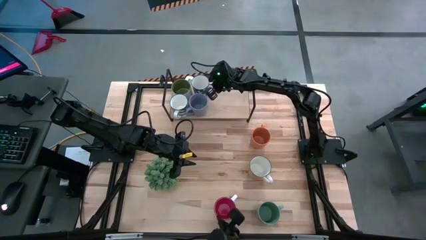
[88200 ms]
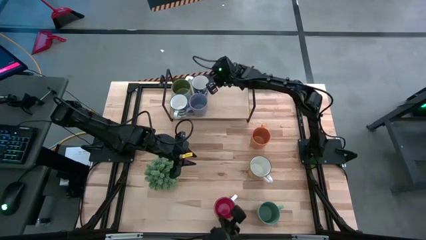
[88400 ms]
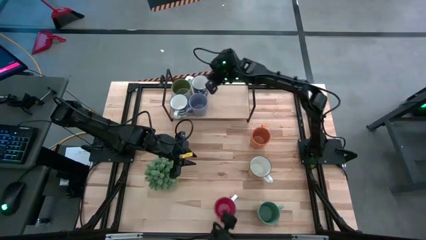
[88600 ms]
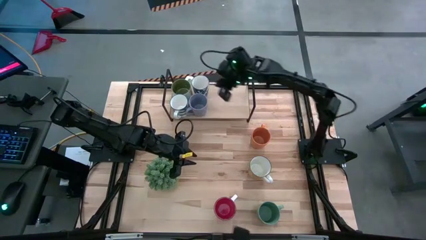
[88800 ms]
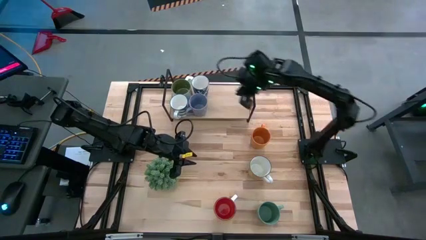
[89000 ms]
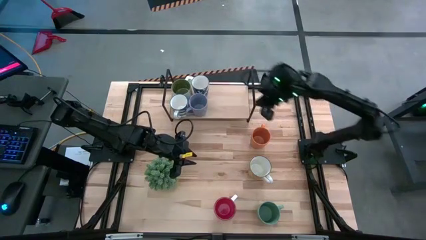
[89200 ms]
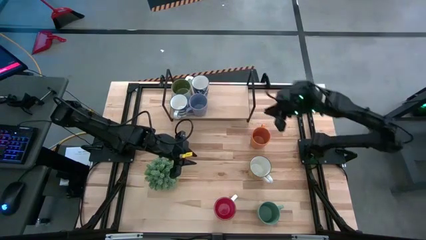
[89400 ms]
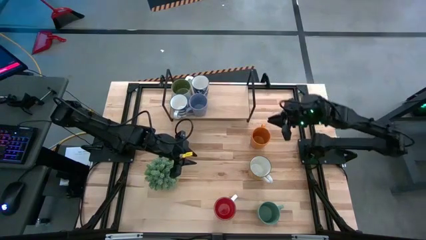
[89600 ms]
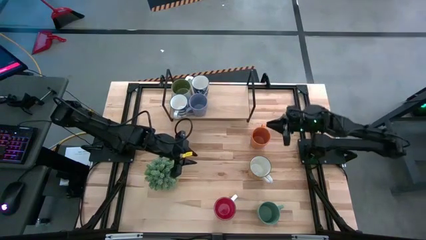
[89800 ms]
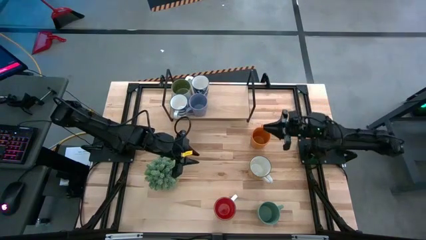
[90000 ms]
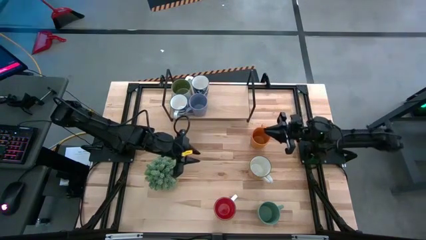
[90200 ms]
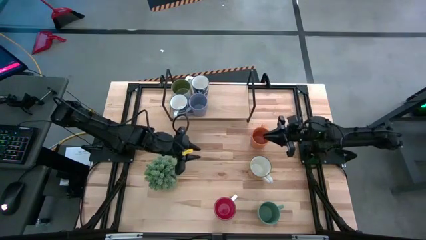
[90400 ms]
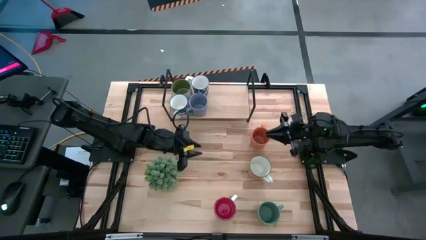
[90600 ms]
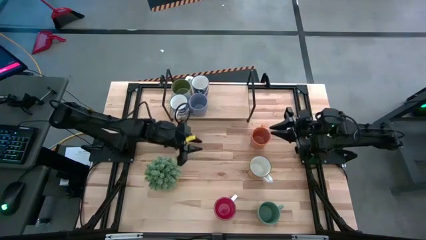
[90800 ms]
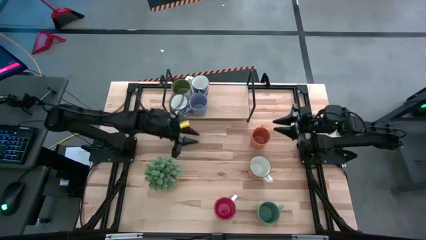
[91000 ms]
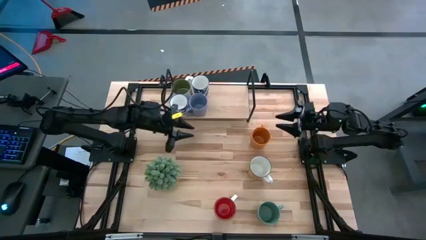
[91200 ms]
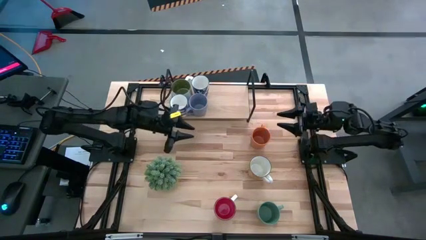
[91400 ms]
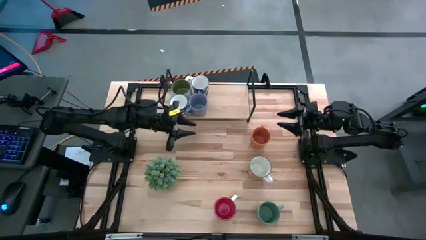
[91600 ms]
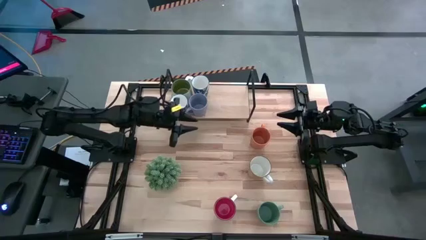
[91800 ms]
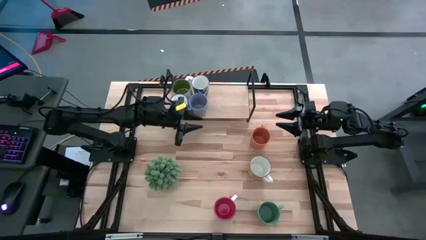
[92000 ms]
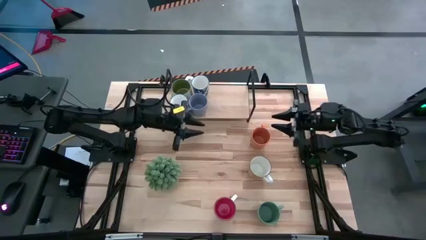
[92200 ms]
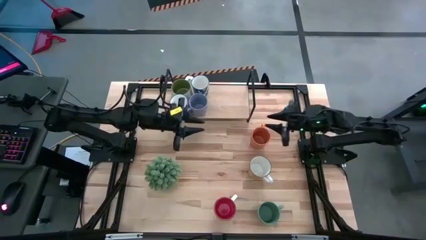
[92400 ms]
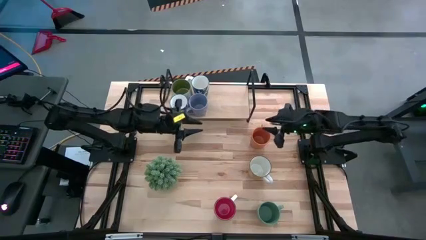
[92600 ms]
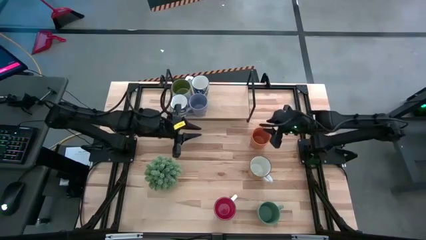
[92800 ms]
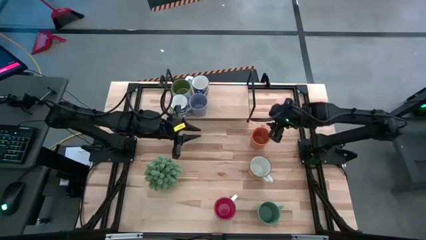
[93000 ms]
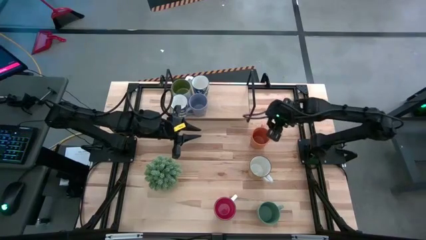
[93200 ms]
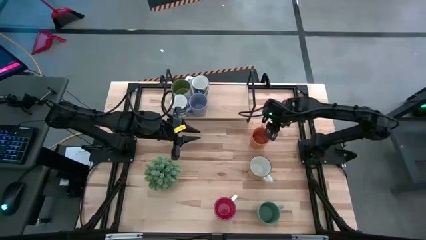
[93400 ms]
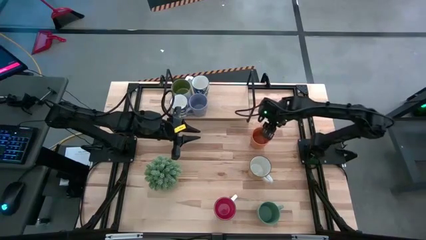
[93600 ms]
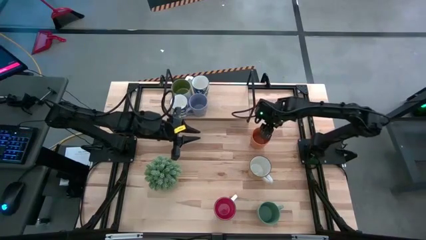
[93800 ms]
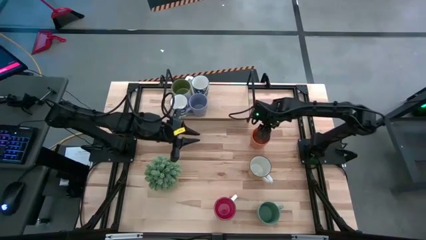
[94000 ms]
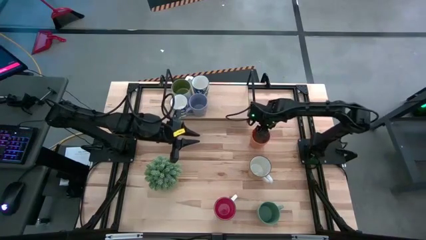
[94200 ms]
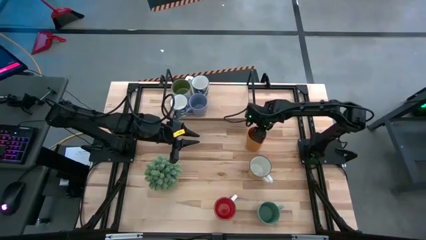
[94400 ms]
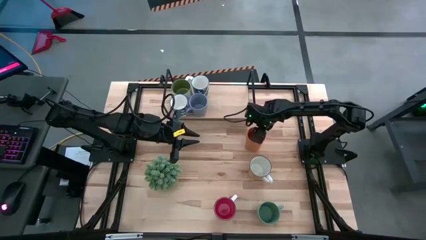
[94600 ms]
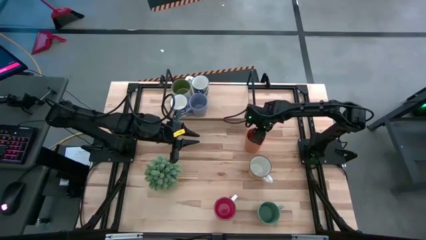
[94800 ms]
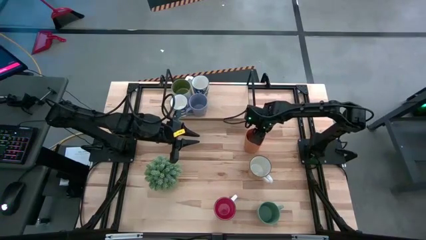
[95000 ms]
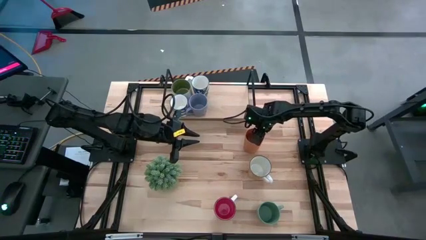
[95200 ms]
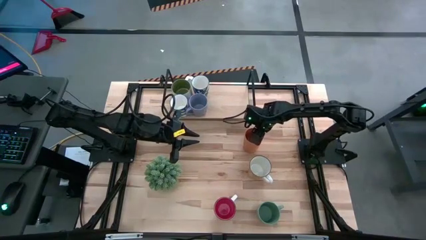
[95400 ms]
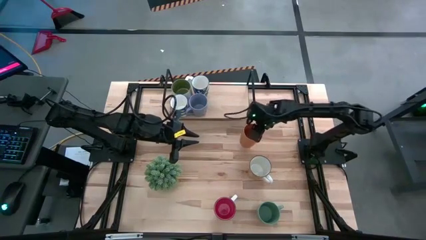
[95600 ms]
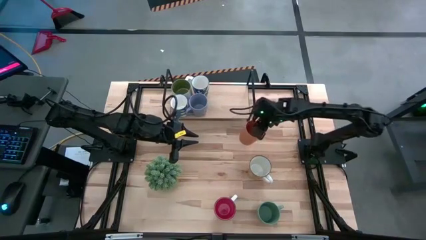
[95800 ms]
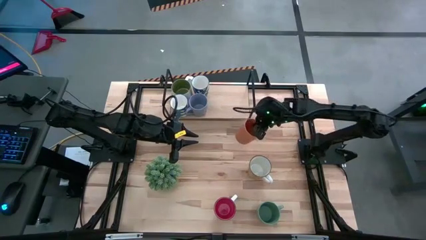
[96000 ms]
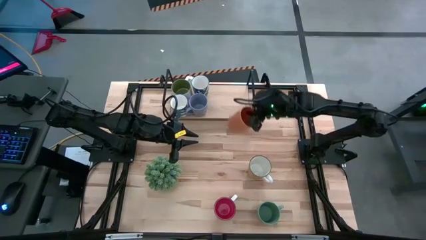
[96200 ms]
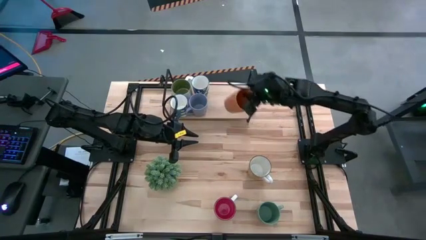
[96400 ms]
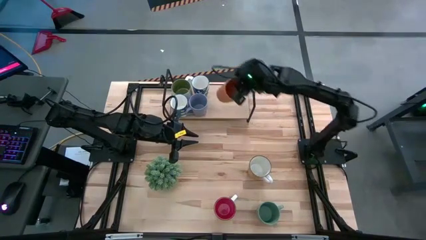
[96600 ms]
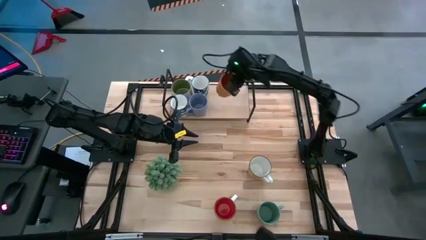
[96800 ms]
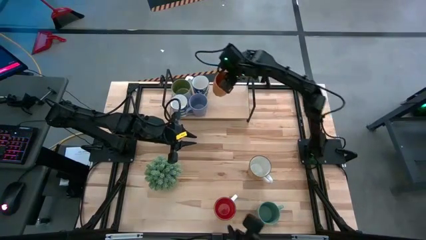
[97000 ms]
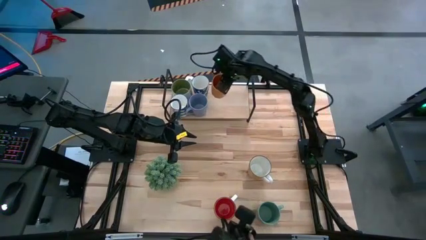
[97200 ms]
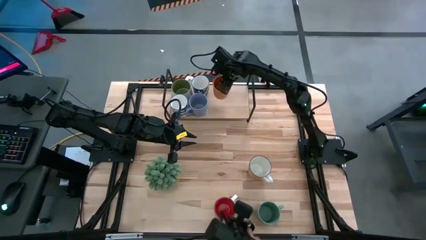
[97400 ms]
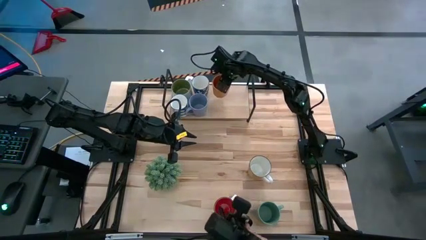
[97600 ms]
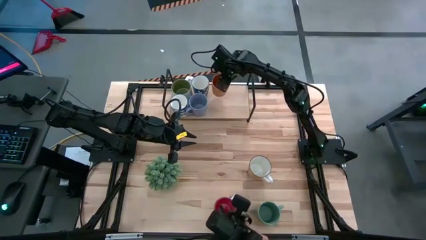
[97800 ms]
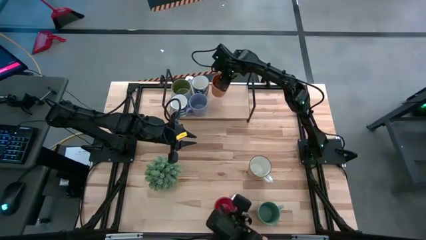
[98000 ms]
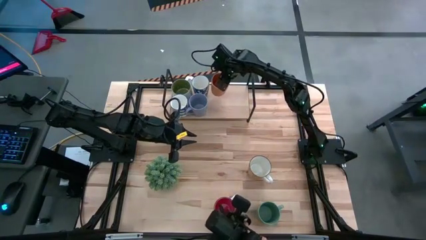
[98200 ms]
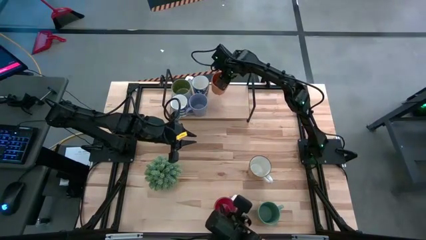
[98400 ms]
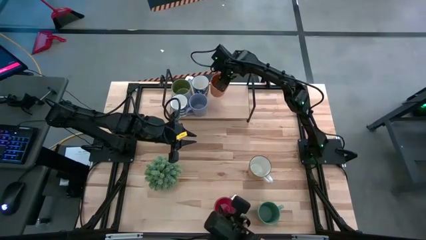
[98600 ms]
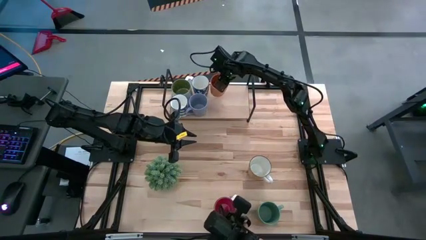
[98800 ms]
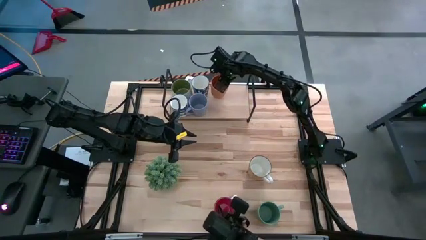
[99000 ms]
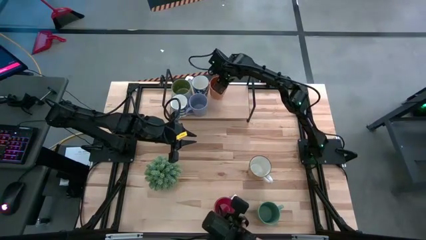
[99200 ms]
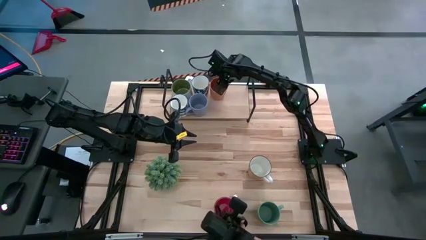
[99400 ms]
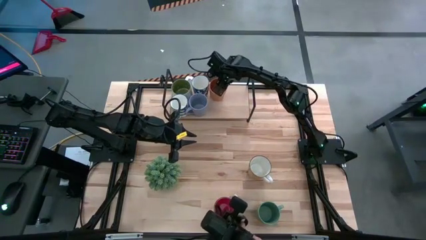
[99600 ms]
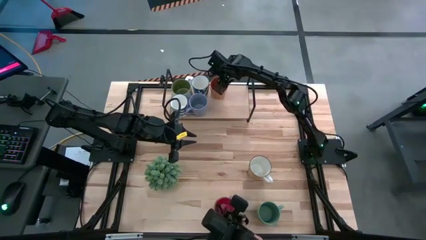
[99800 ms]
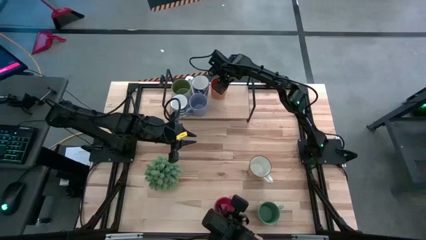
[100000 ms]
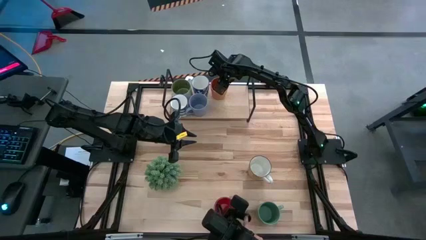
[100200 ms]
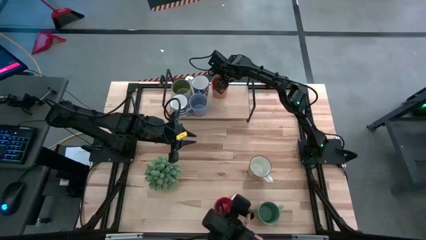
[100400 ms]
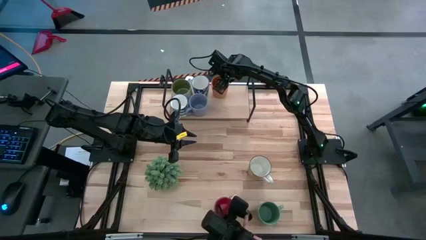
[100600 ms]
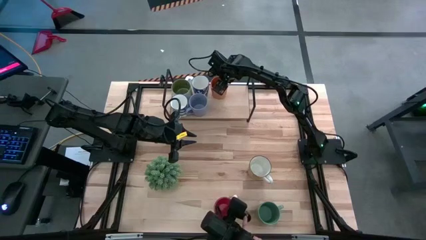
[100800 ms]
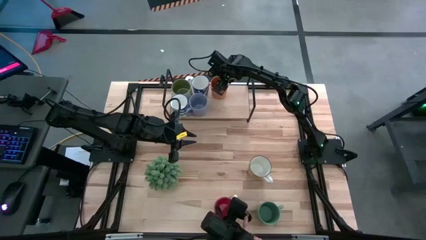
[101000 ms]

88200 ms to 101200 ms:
Task: Place coffee mugs
Put the orange mug on the shelf
